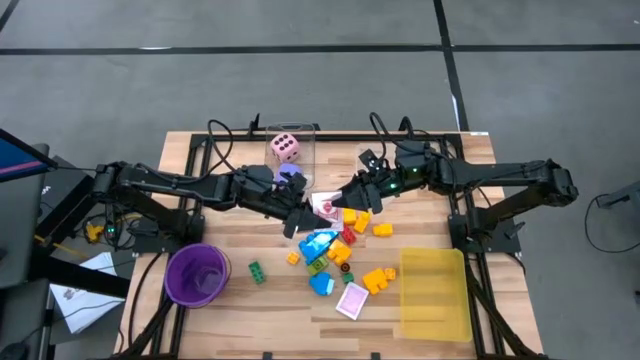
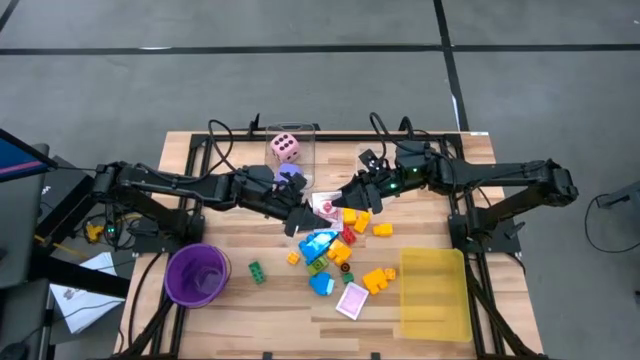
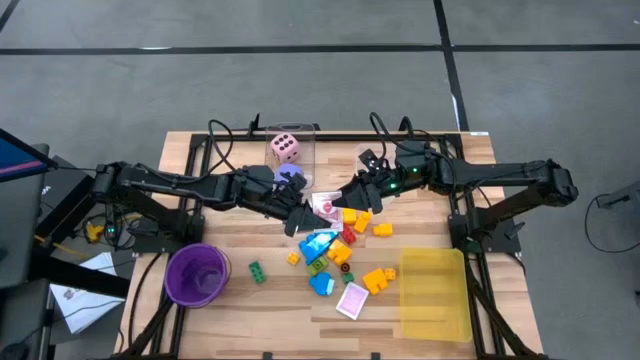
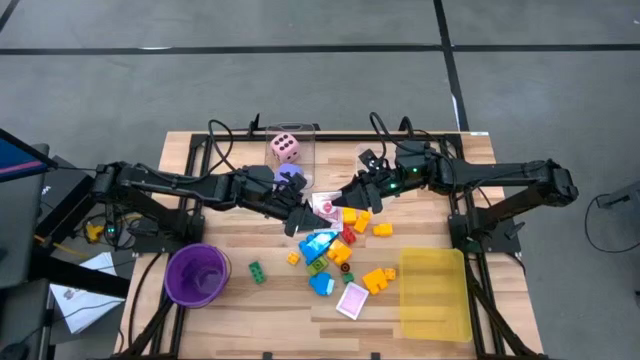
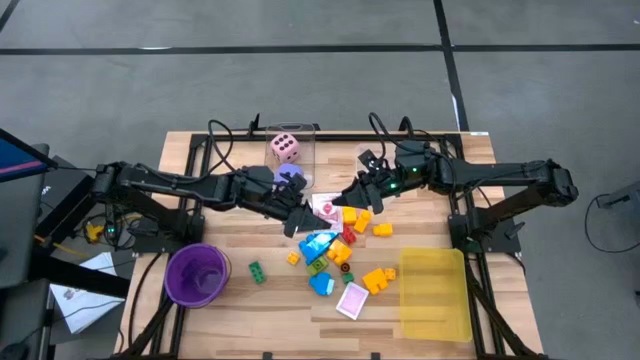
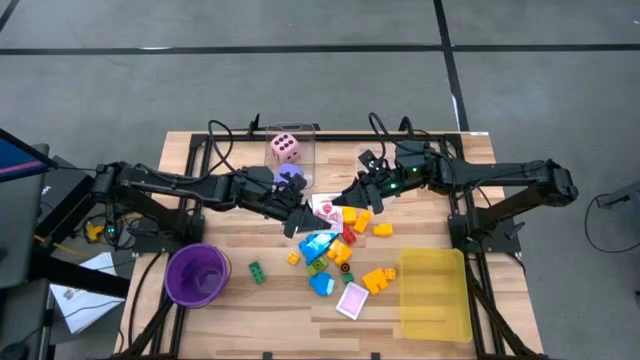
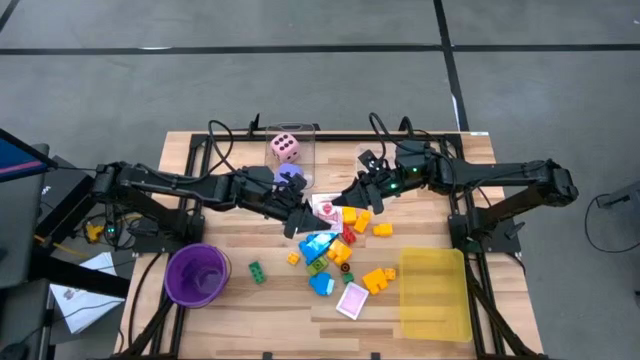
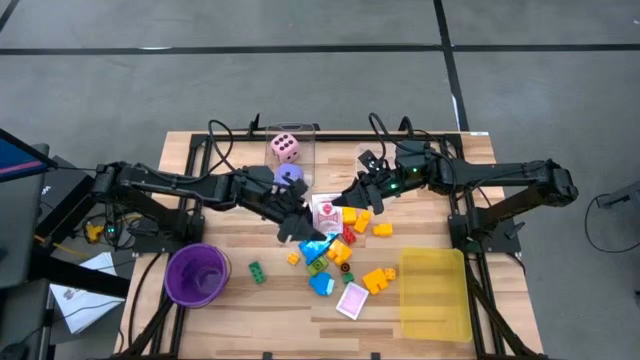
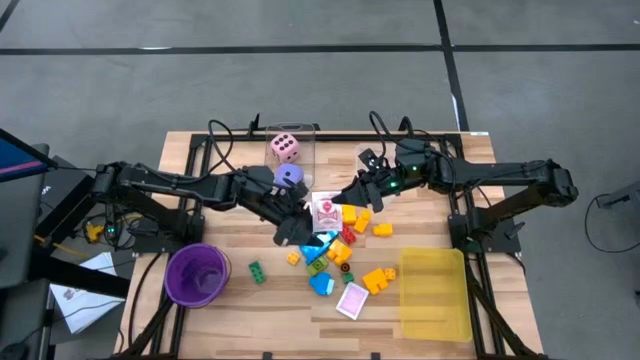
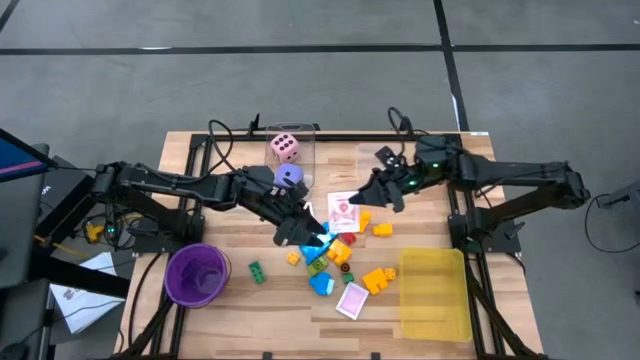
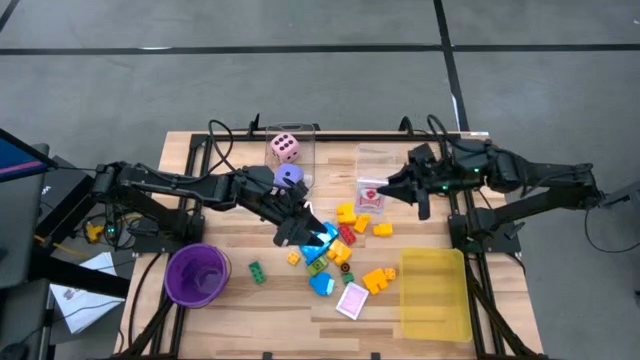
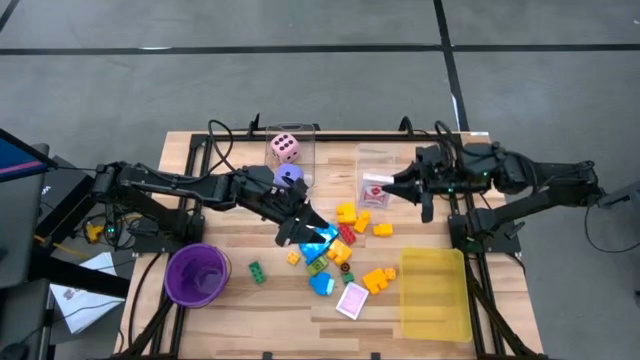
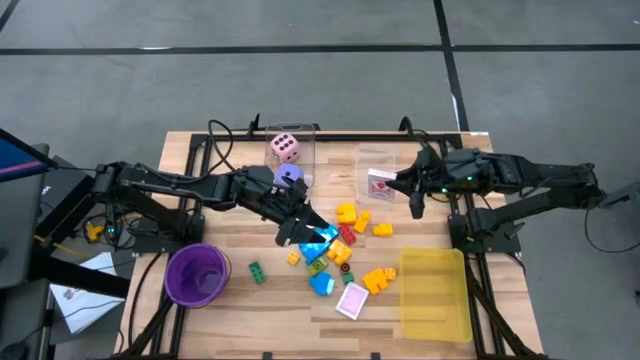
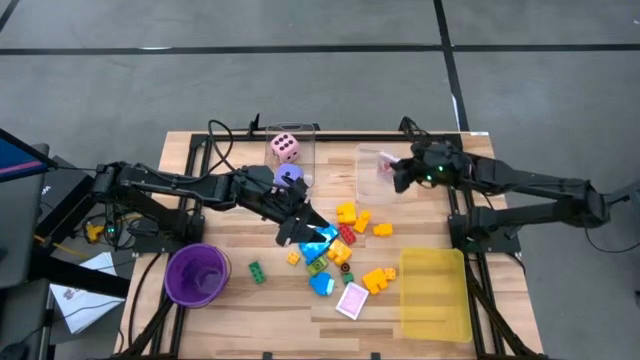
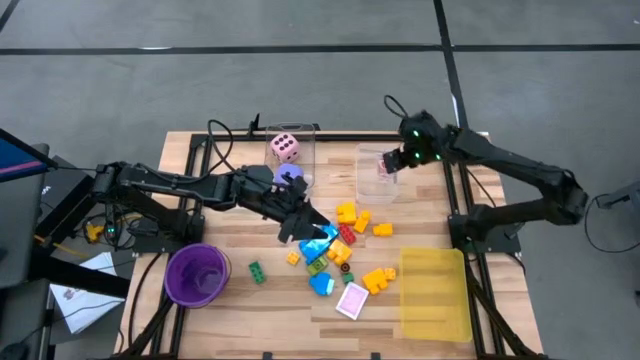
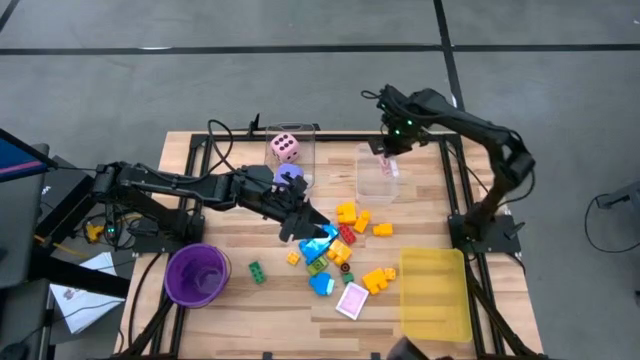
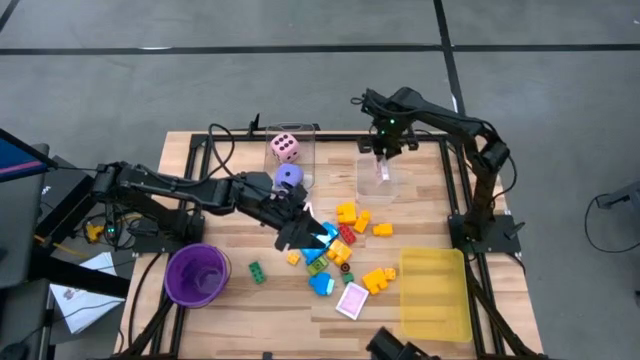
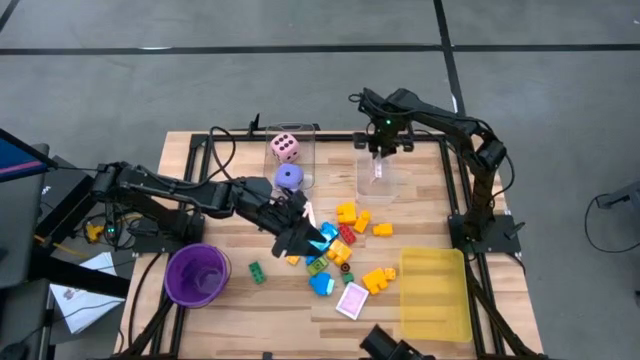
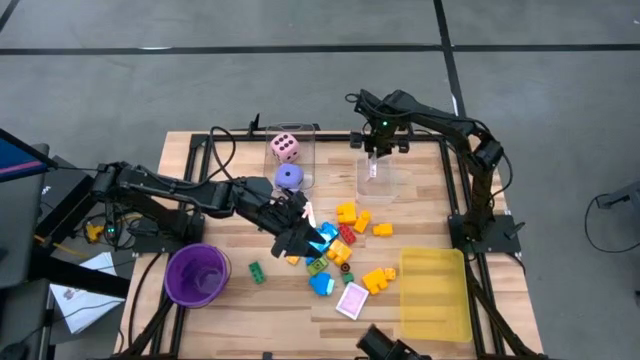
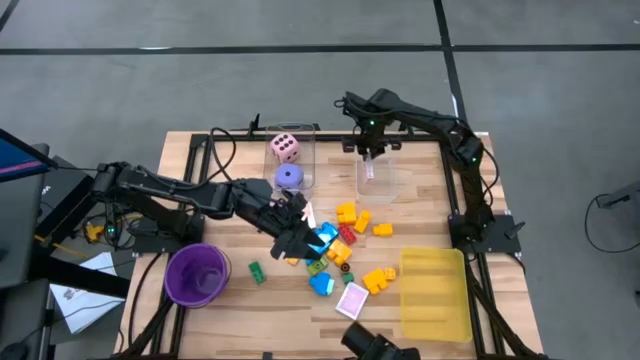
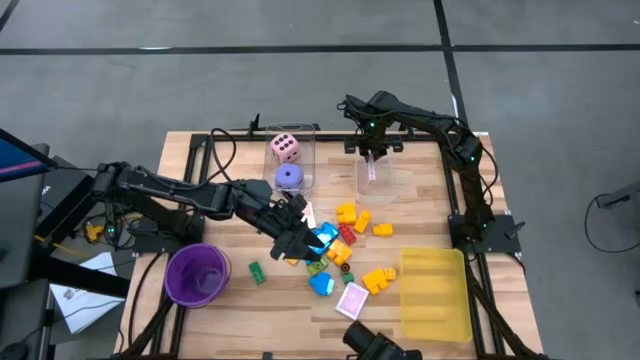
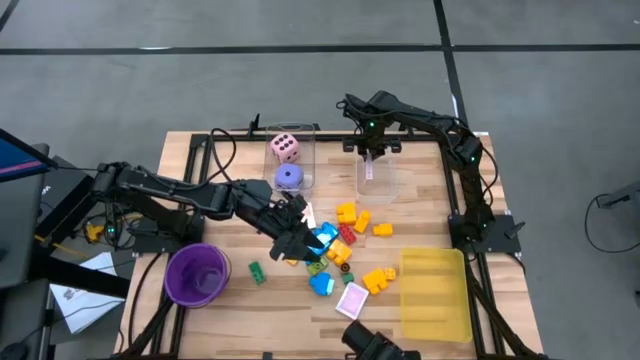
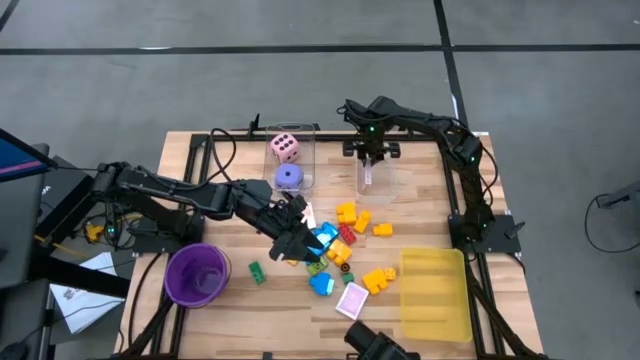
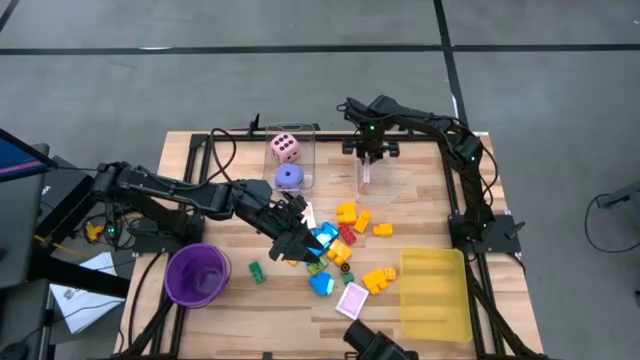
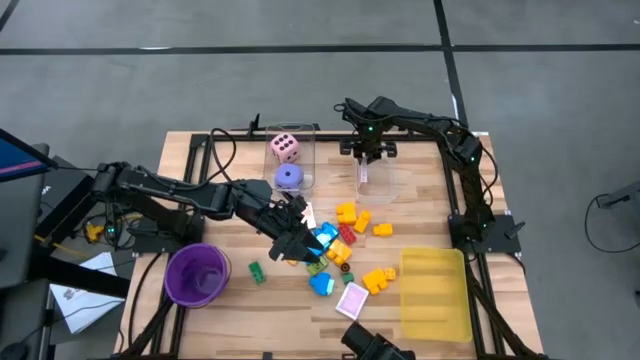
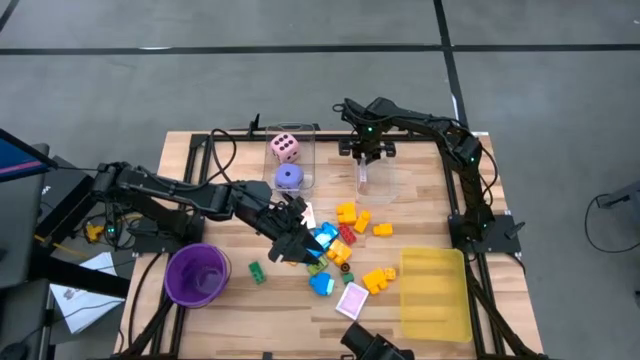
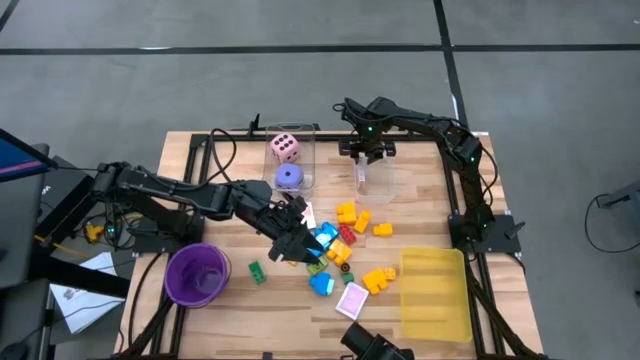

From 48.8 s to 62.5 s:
Task: Pick & Place Toys
Put the red deck of cards into the right transparent bin

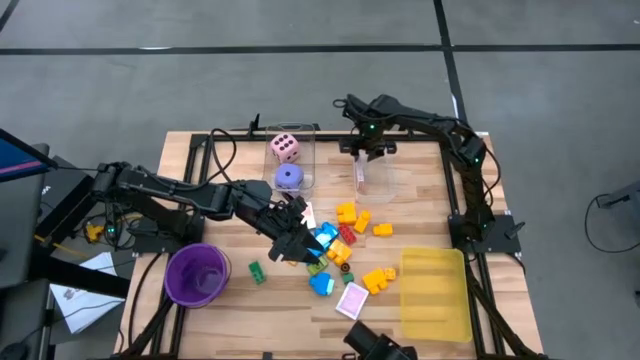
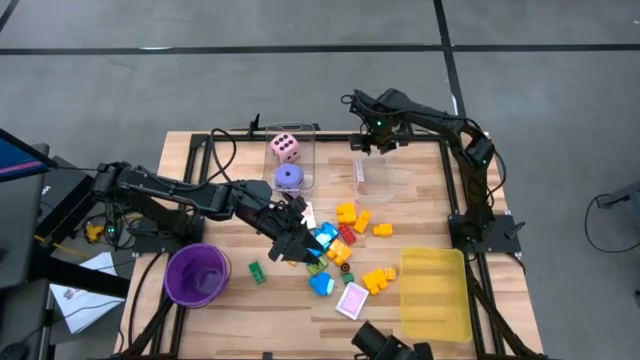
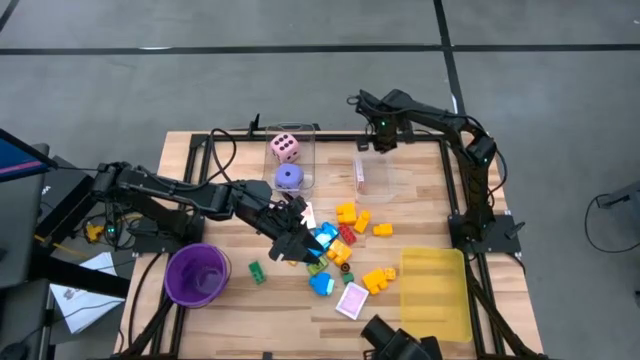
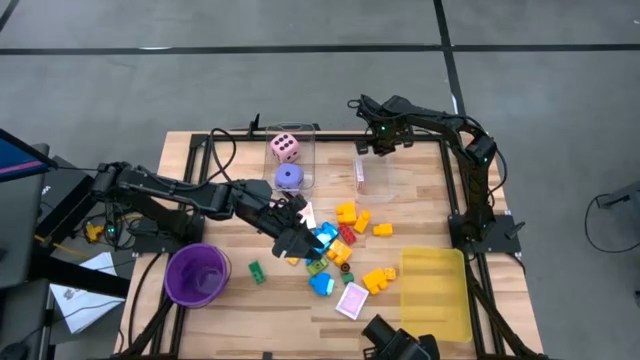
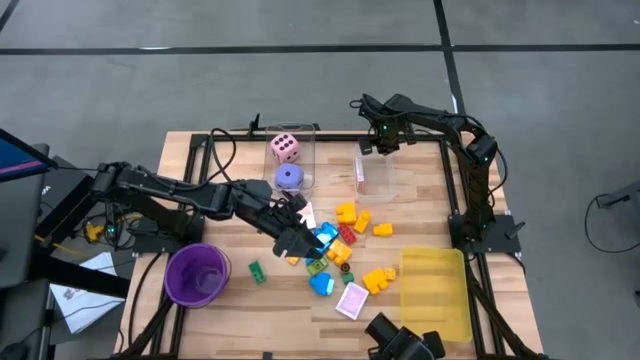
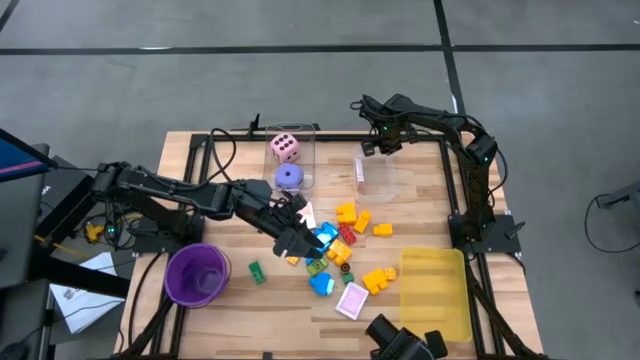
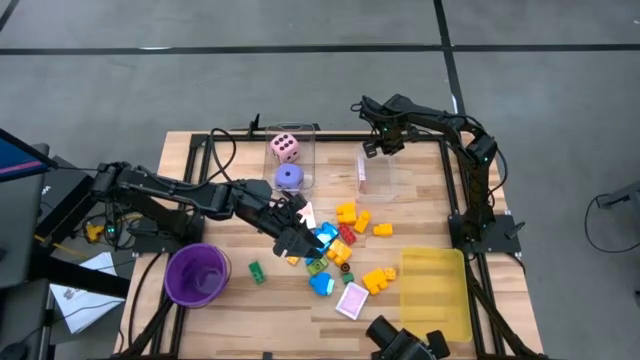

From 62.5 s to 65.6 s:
Adjust the right transparent bin

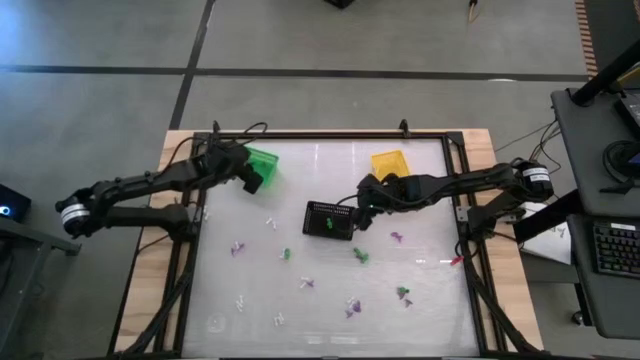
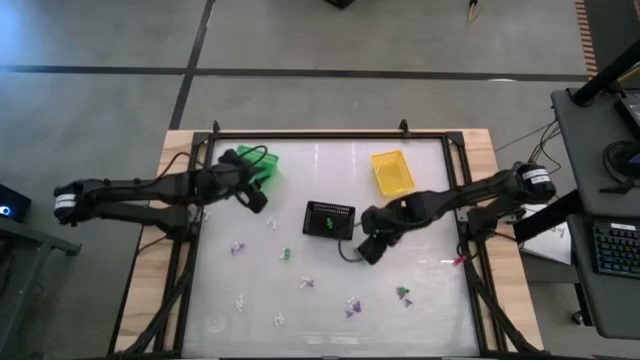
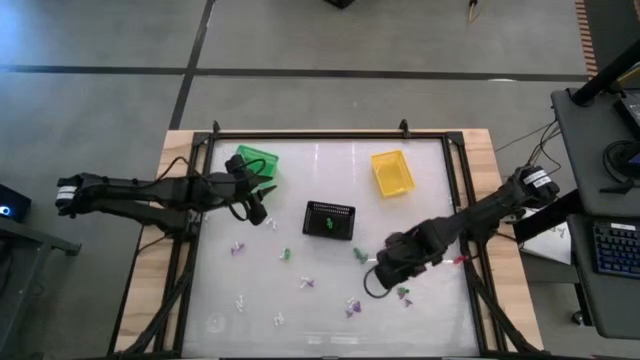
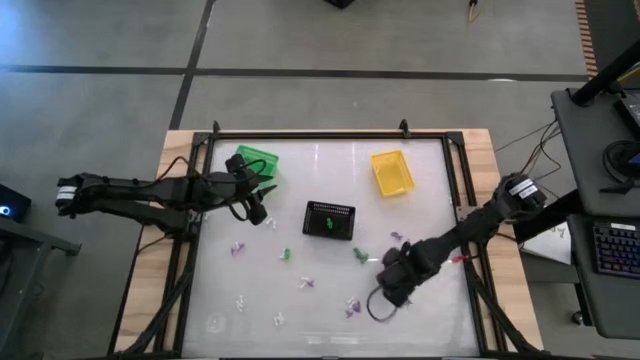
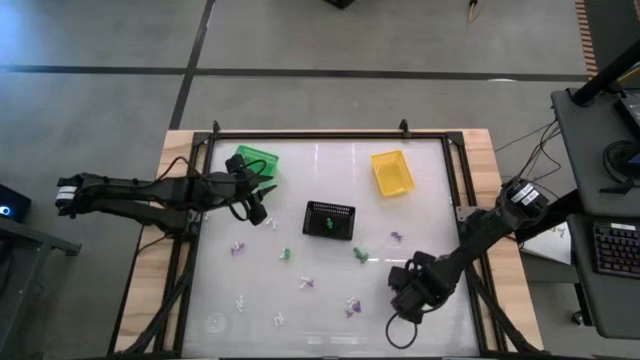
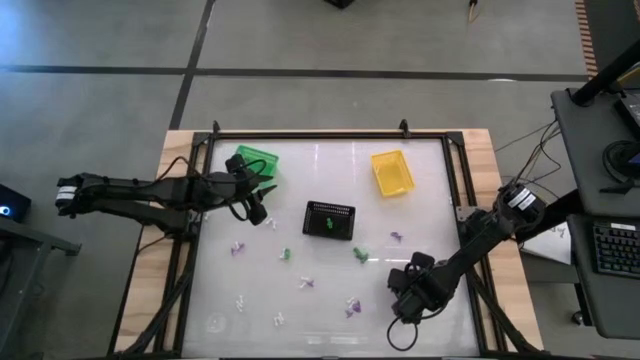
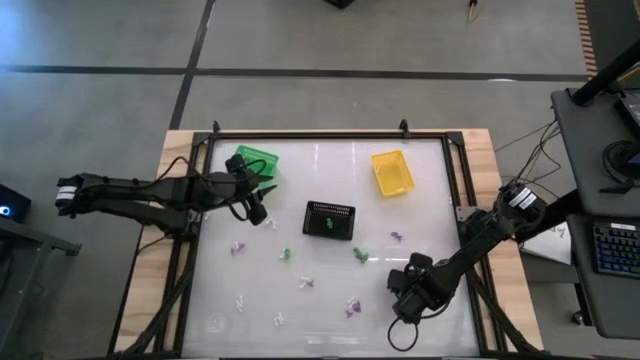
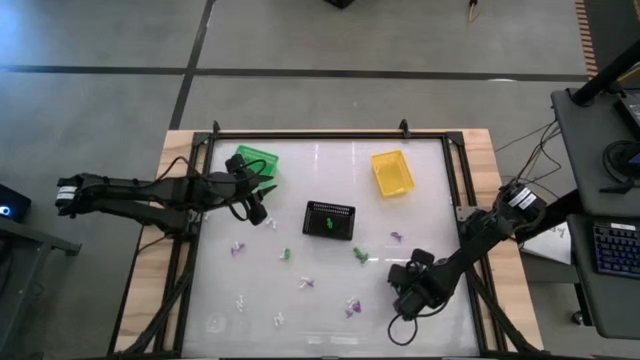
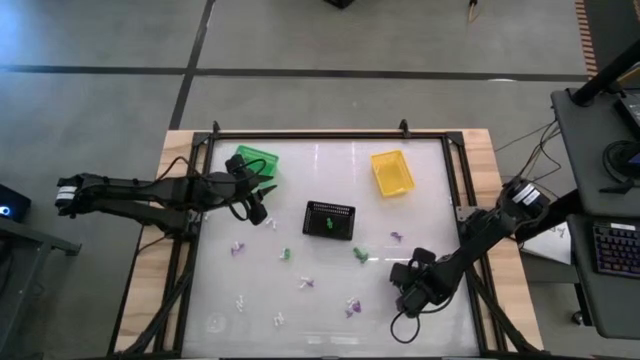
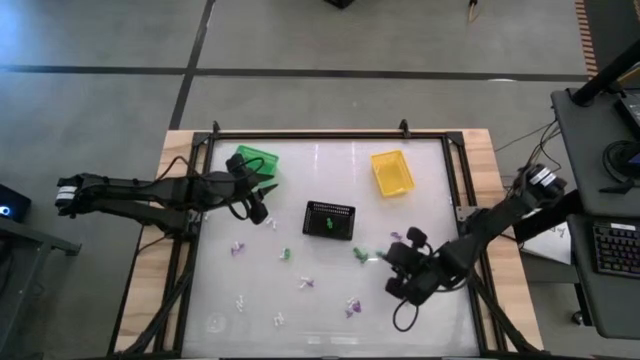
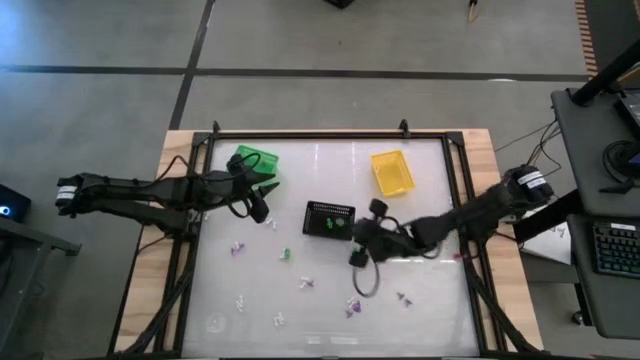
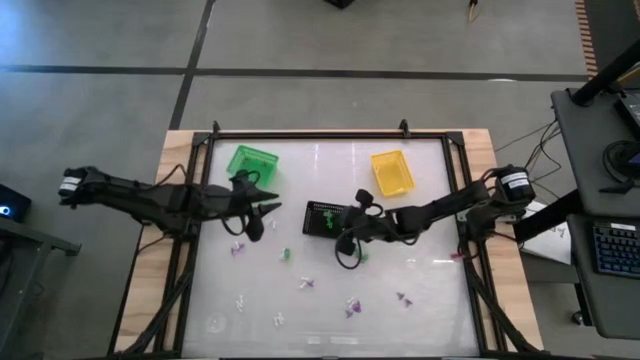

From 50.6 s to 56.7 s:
Task: Sort Halloween decoration
Put the green skeleton toy into the black bin
